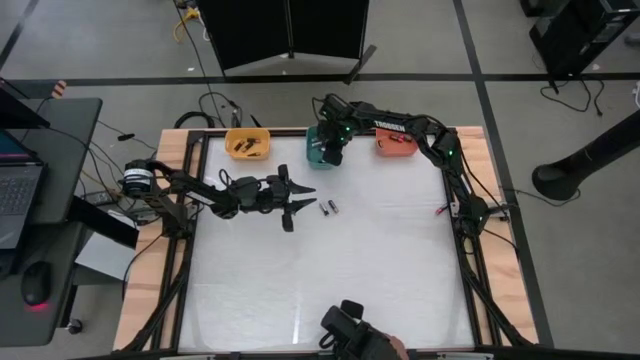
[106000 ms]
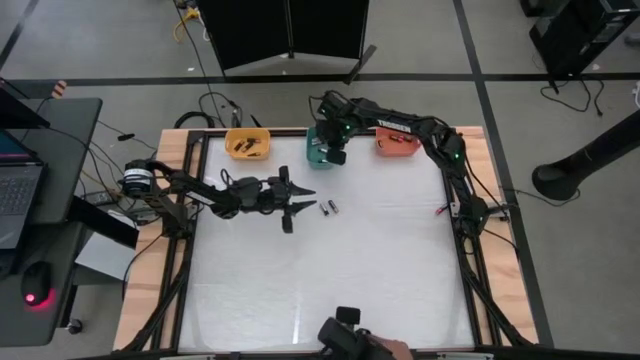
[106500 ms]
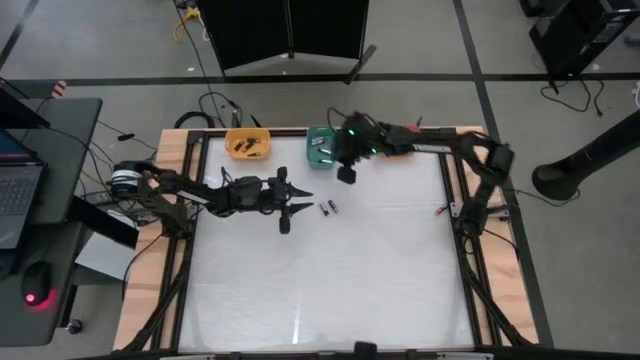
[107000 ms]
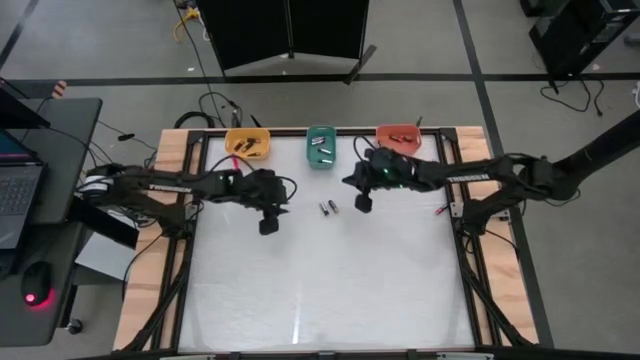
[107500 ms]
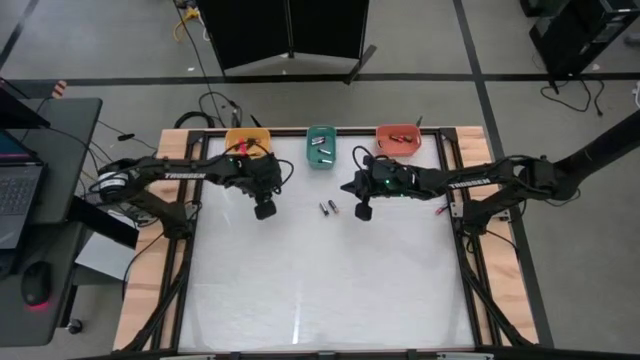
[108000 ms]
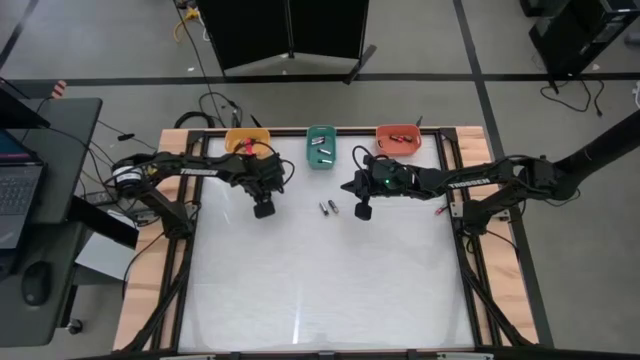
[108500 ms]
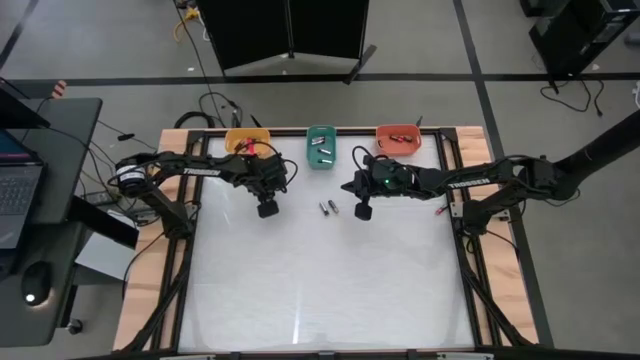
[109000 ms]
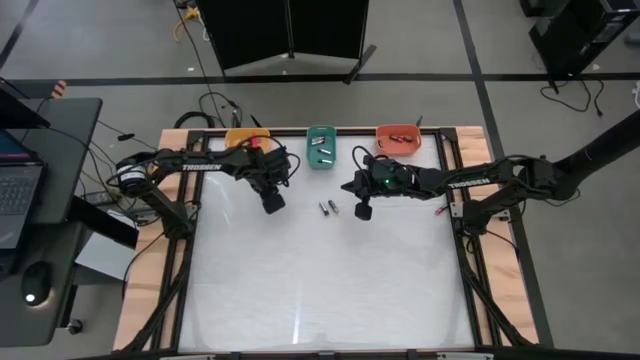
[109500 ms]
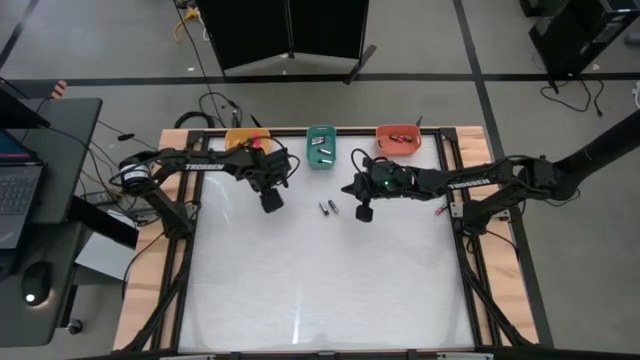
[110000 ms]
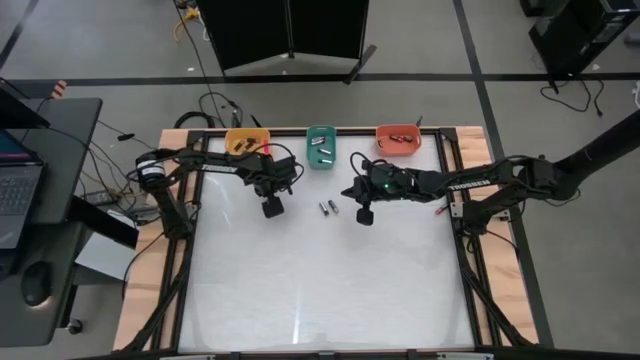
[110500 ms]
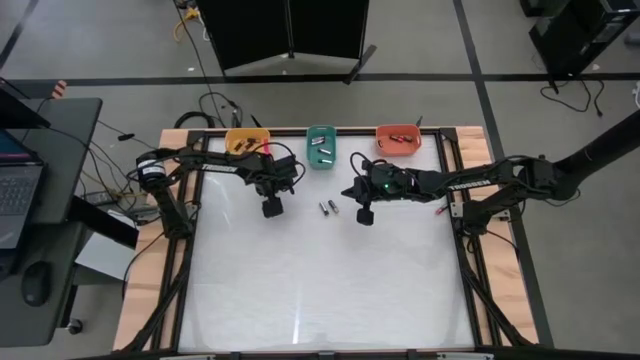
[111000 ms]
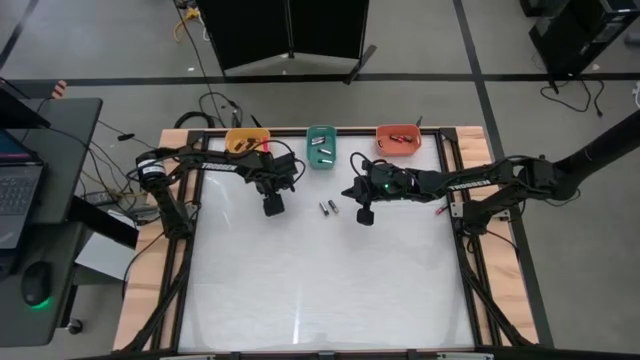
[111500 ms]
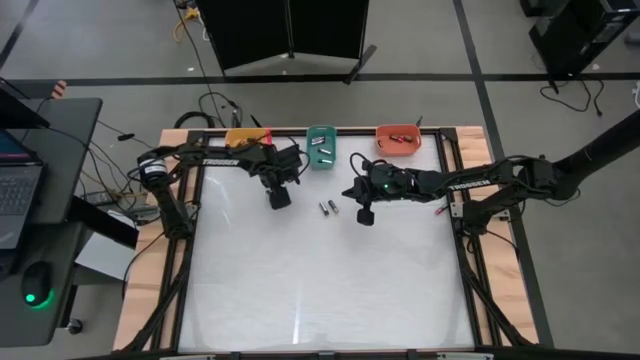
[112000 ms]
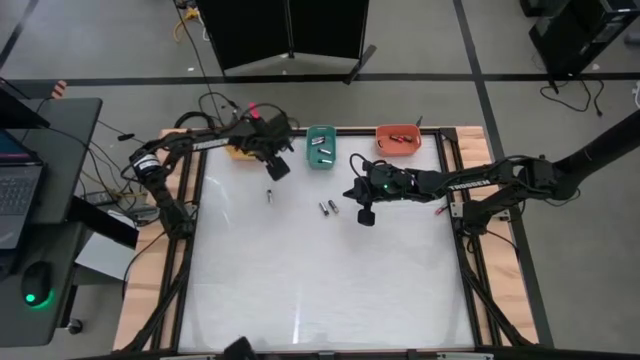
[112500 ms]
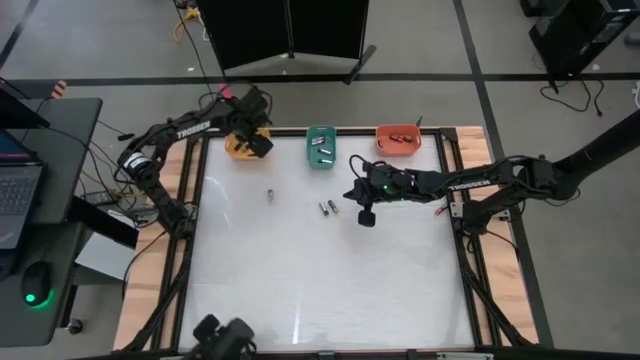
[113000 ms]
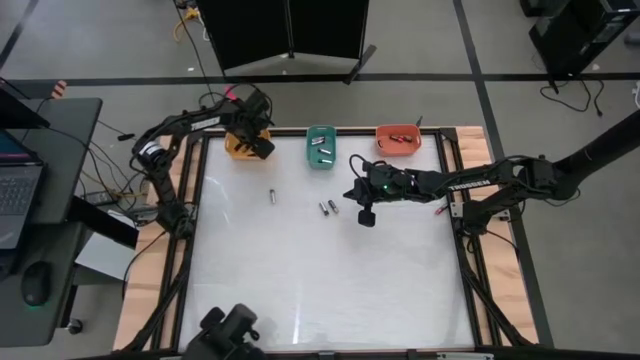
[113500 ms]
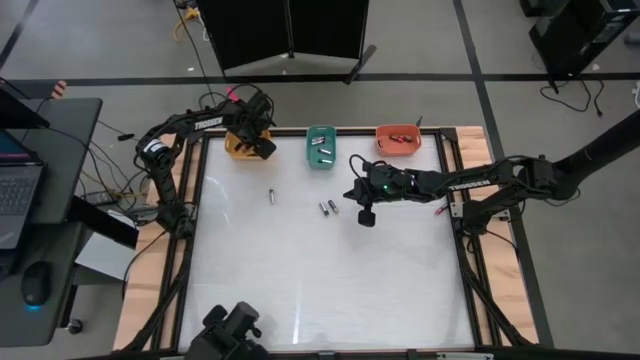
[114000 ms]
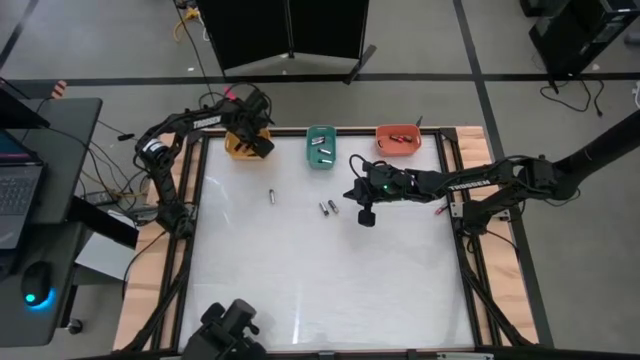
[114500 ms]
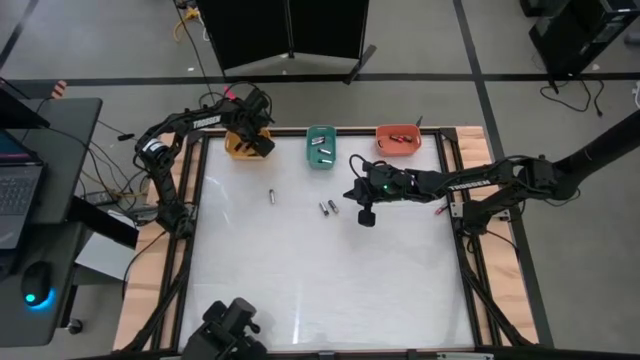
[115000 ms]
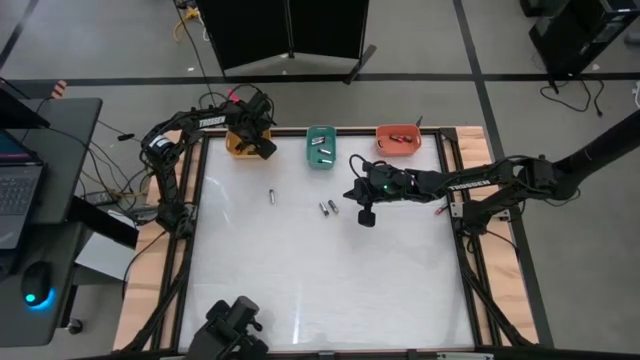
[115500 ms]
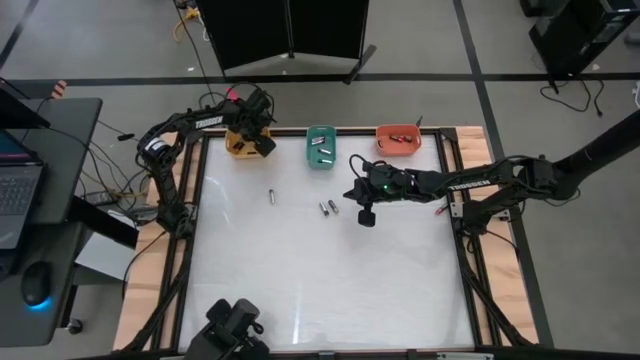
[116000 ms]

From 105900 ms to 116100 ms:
Task: Sort batteries
Put the brown battery into the orange bin

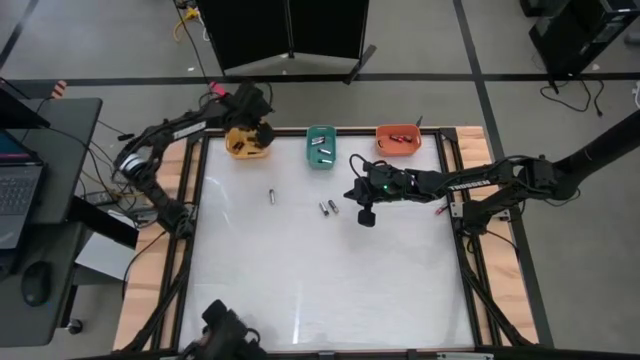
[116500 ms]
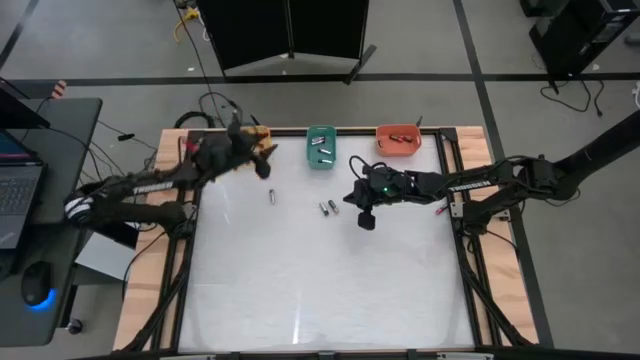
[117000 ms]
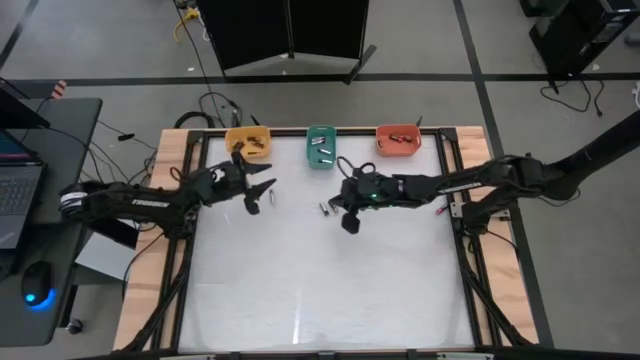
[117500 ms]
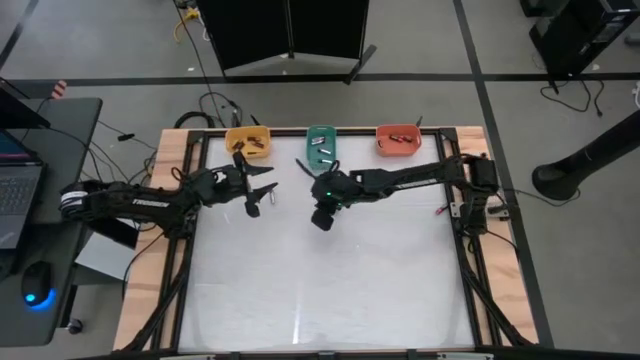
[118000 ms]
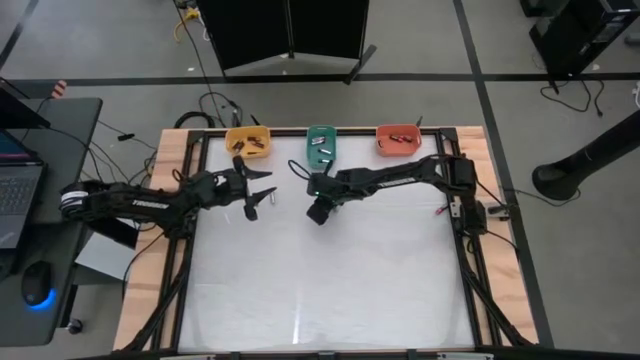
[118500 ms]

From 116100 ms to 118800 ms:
Put the silver battery into the green bin

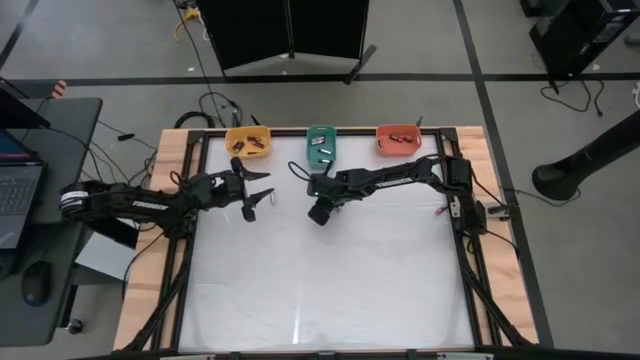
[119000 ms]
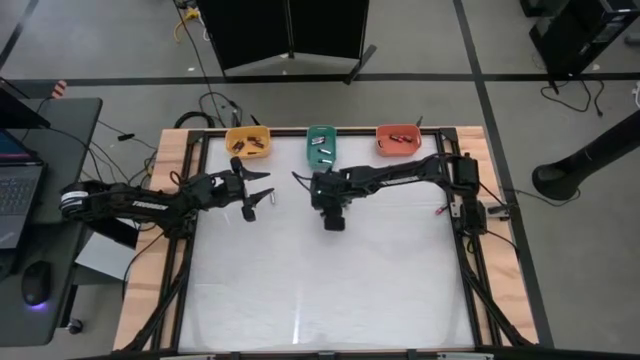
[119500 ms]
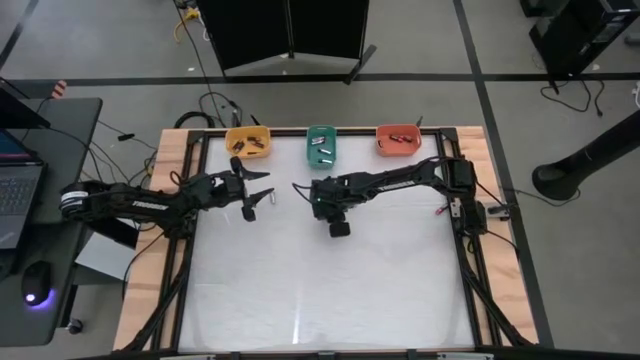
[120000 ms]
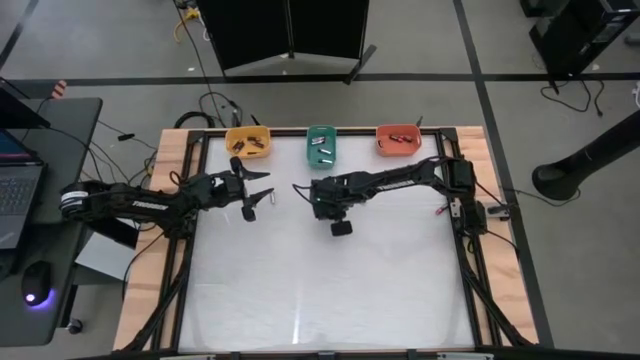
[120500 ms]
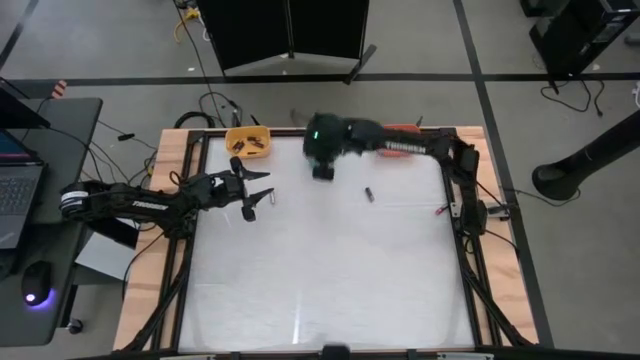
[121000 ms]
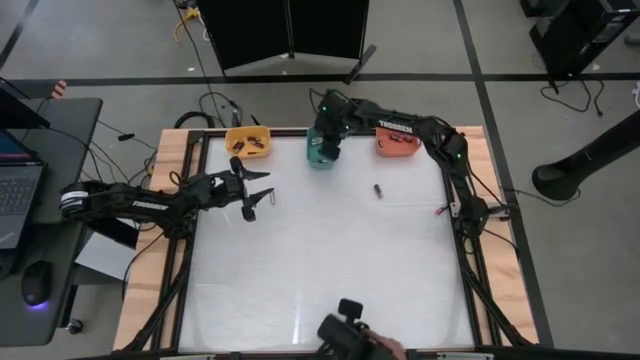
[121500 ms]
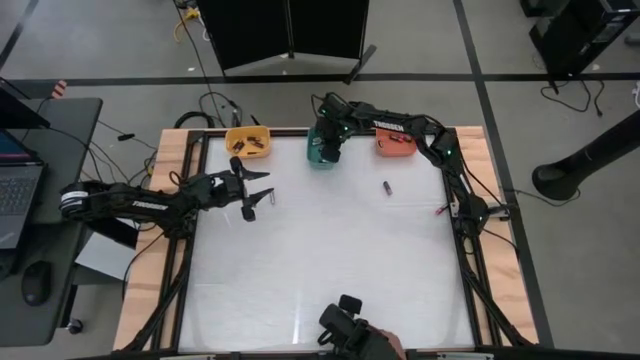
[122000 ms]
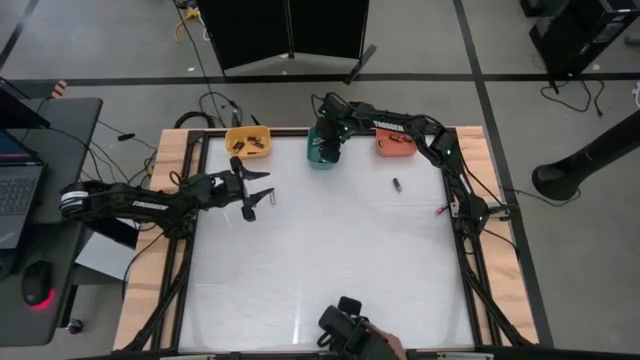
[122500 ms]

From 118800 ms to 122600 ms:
Put the silver battery into the green bin

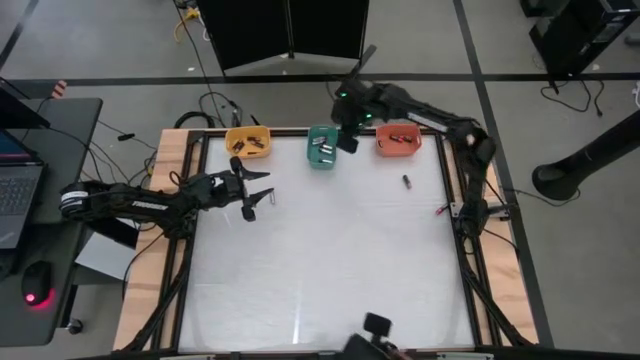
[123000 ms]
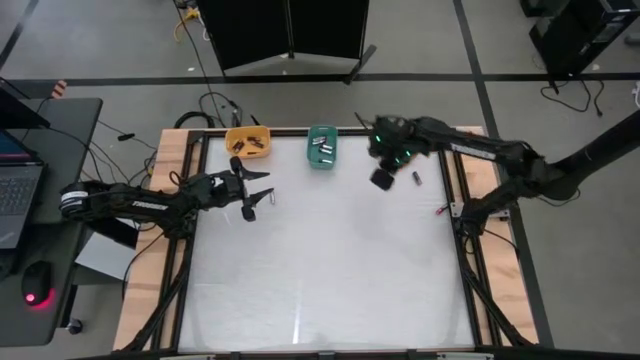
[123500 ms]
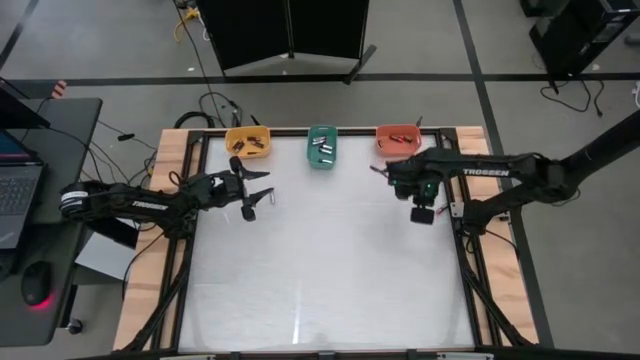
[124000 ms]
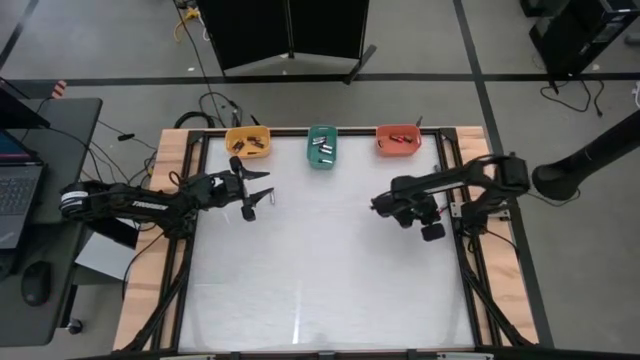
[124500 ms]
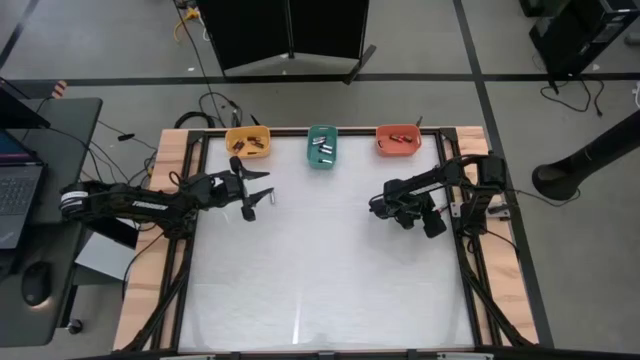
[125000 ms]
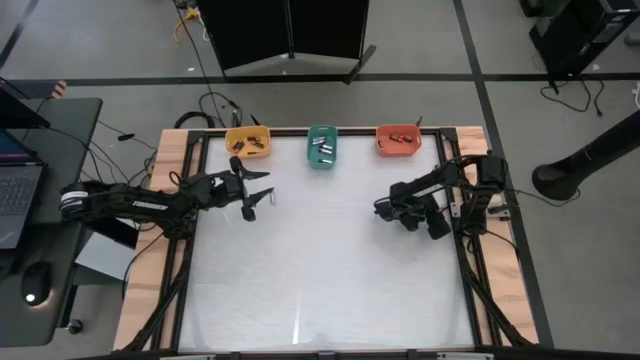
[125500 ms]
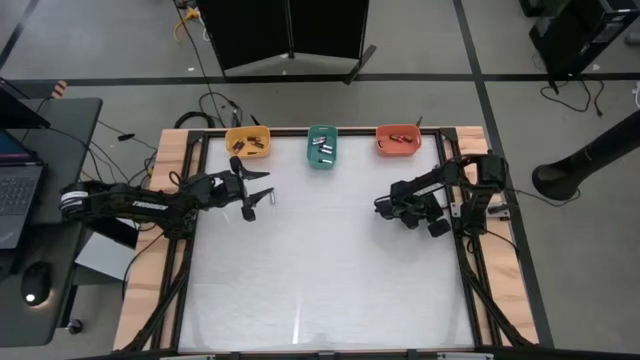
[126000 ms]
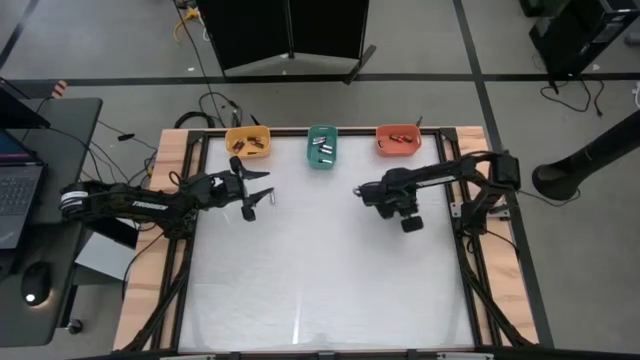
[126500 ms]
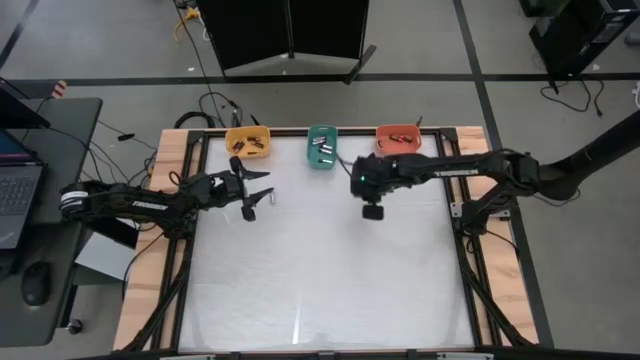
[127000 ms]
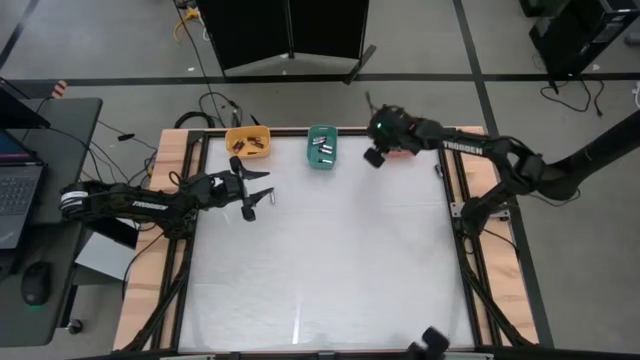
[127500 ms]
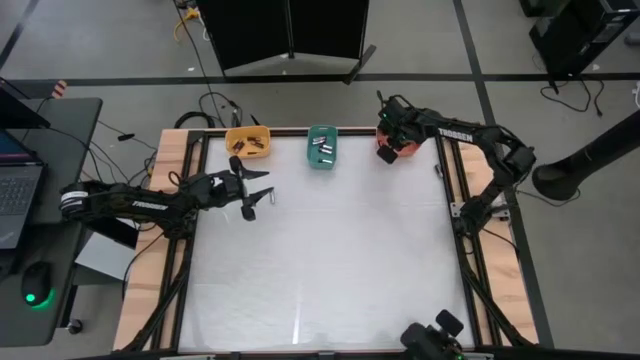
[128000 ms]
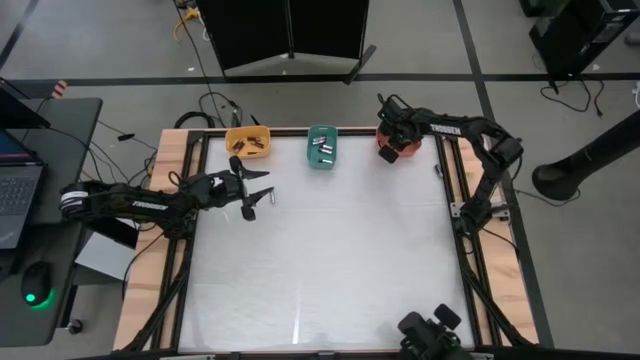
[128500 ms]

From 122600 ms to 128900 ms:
Put the red battery into the orange bin
